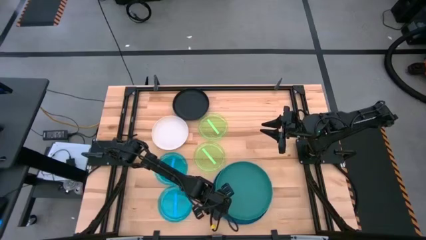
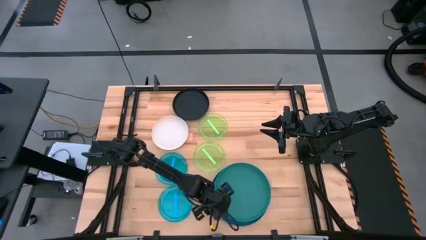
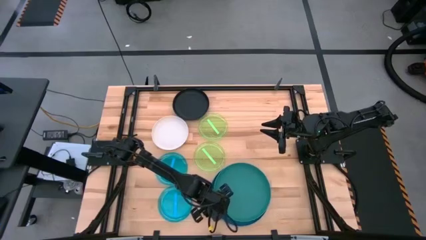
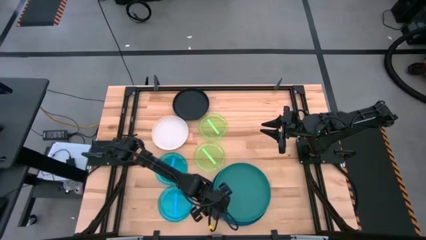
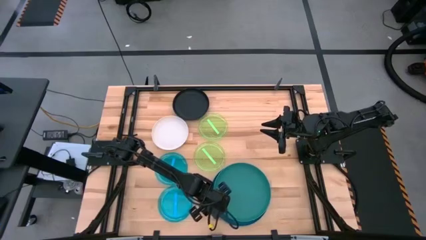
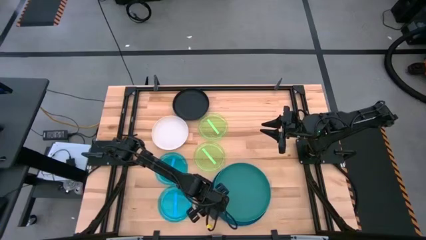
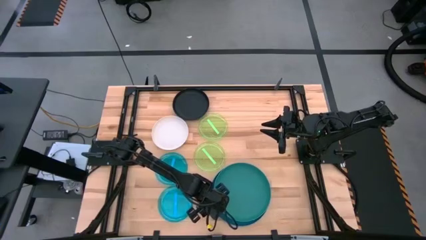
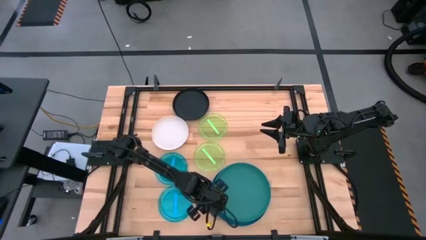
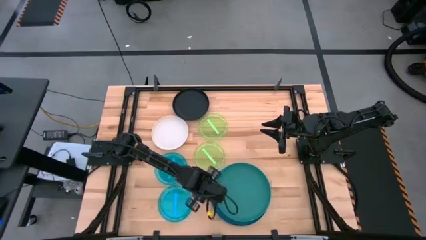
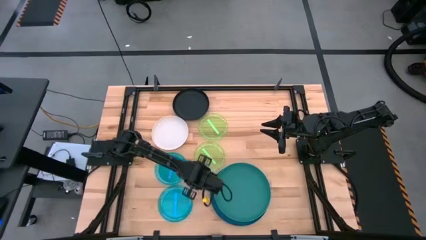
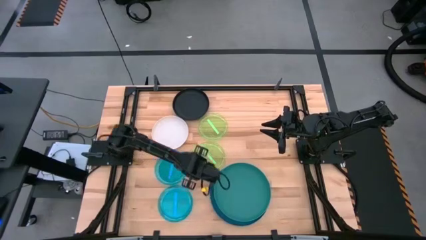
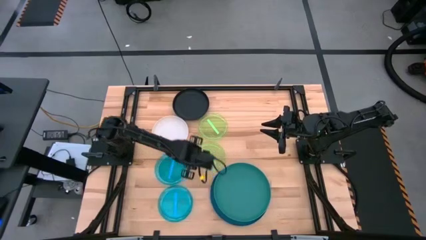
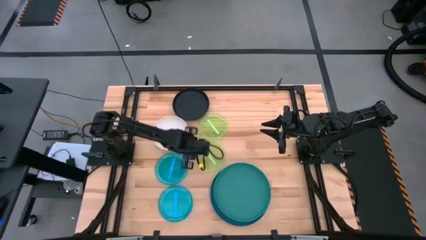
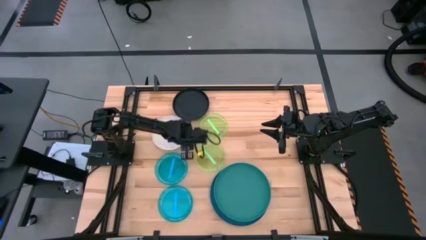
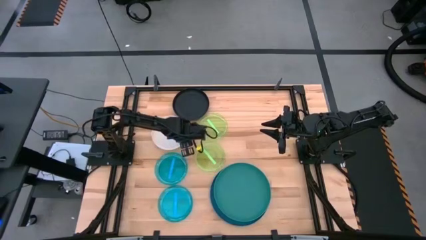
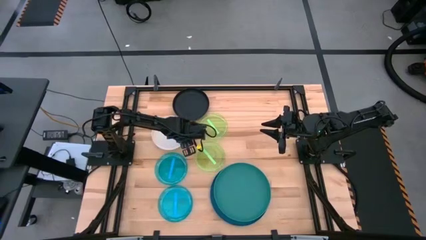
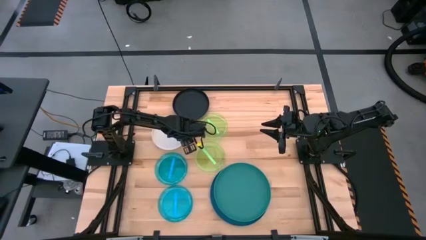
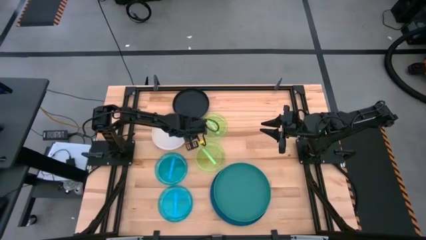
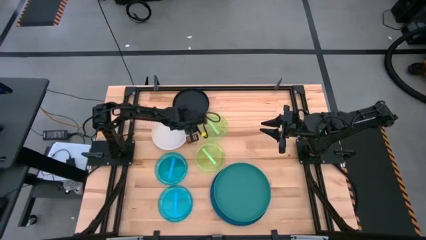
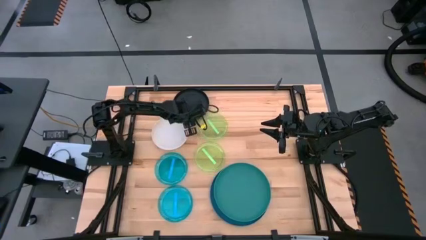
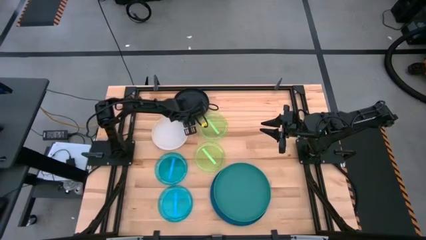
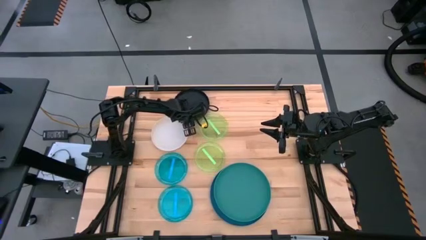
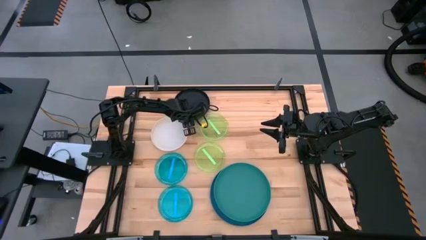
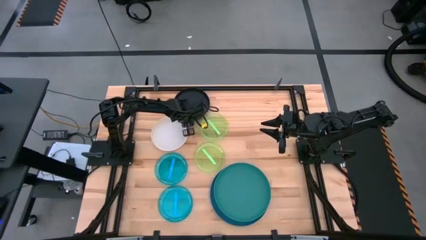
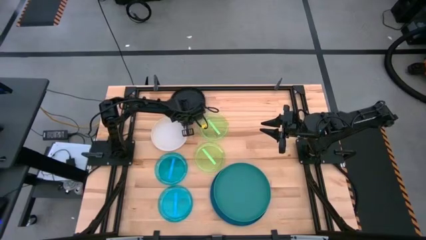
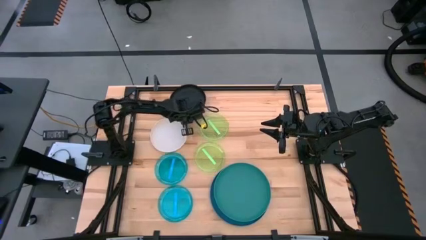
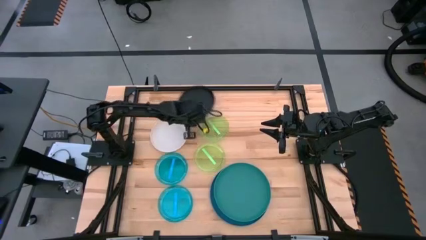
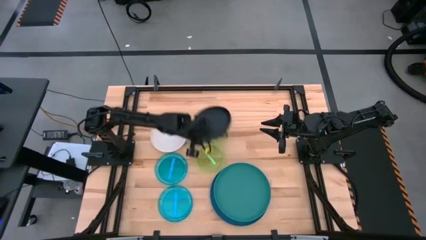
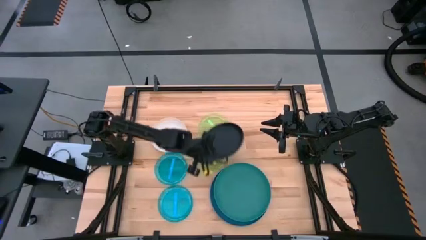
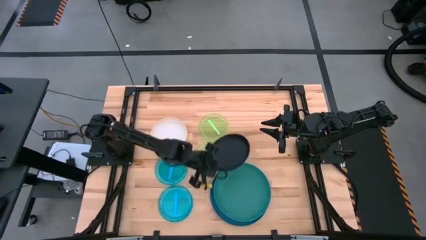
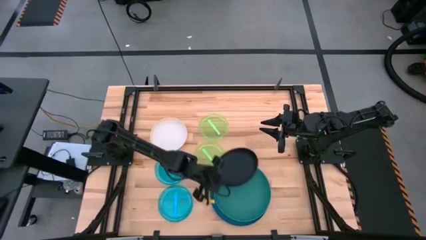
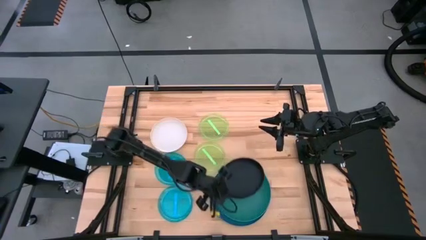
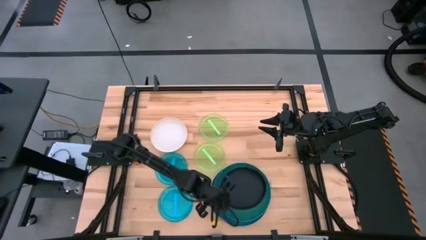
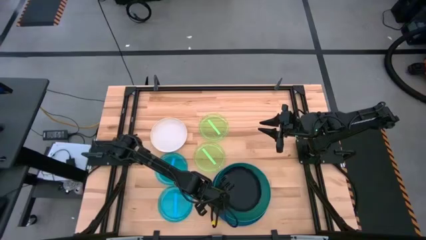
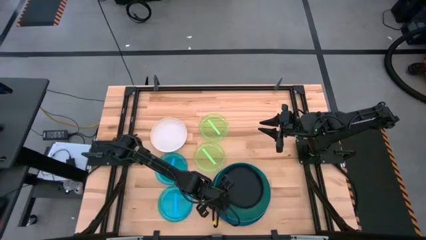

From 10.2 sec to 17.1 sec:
Task: Stack plastic plates
Stack the black plate on top of the green plate

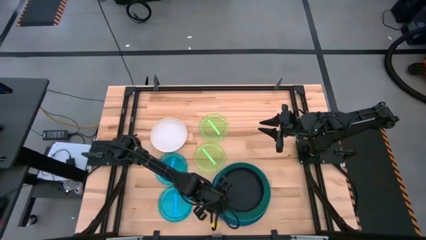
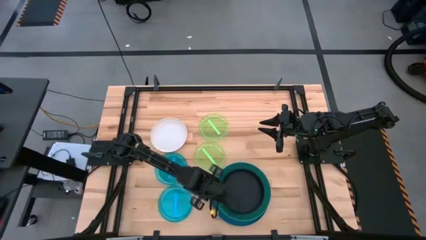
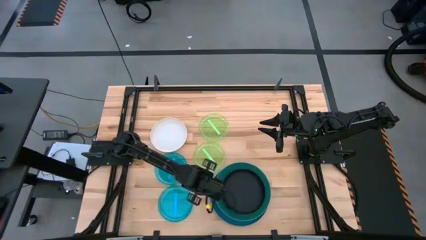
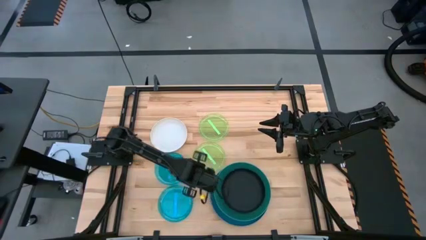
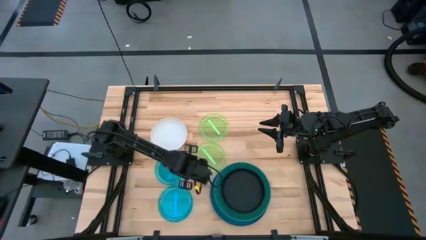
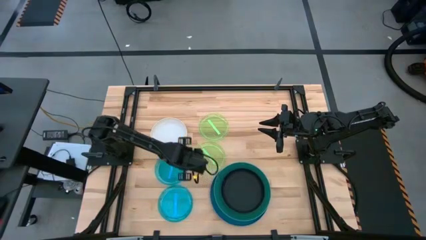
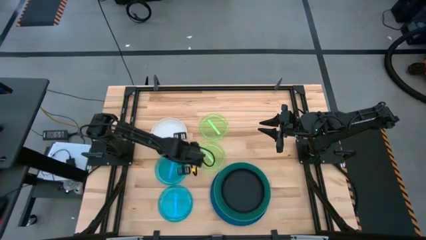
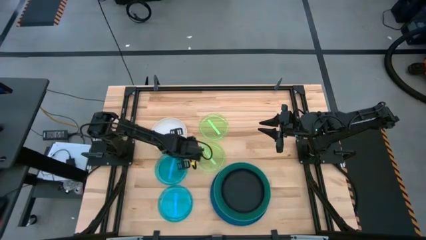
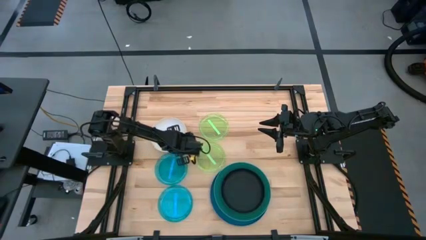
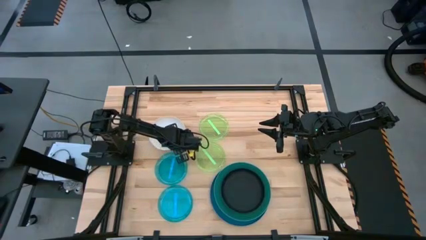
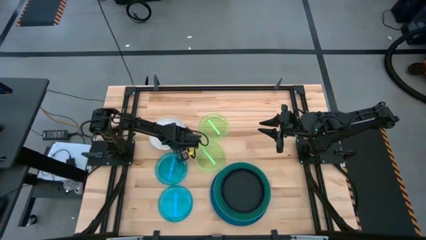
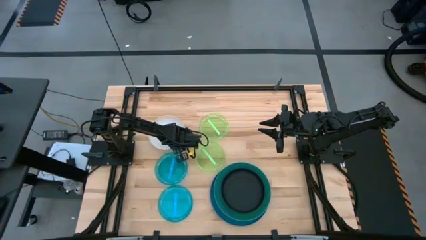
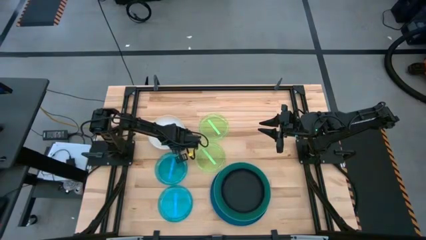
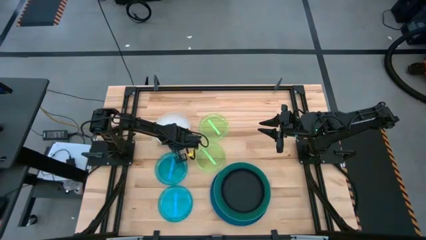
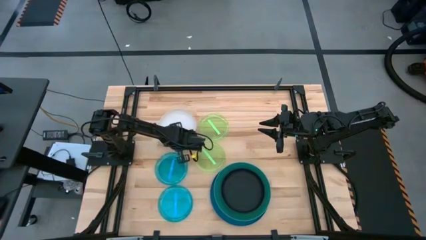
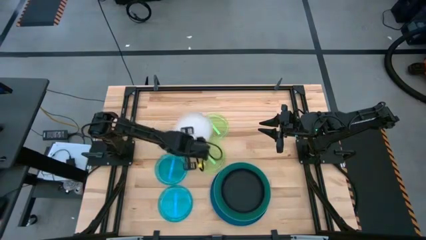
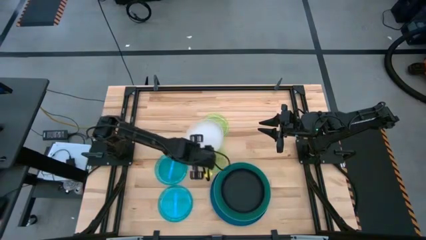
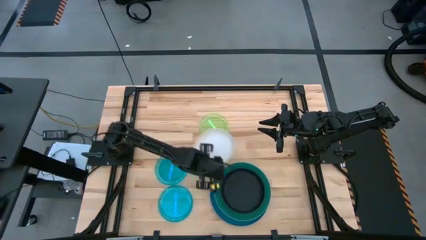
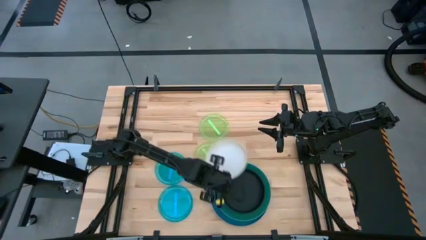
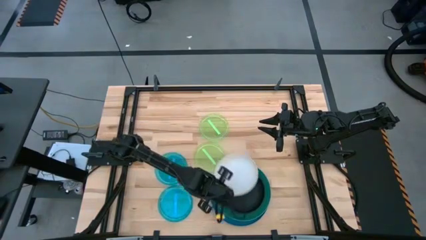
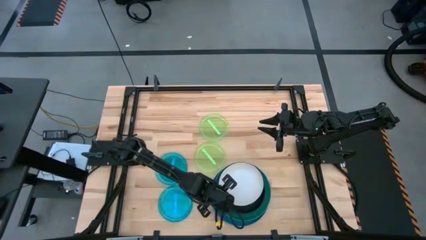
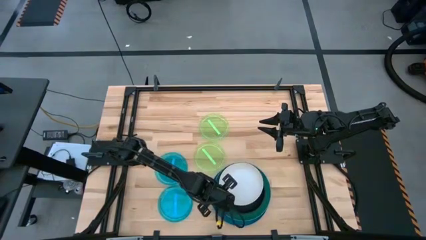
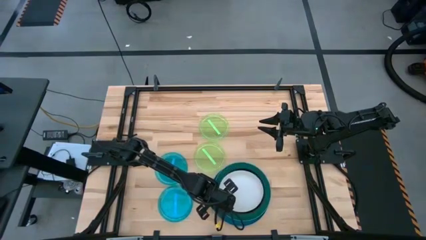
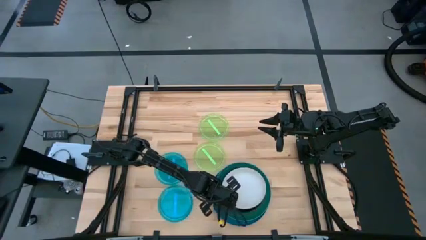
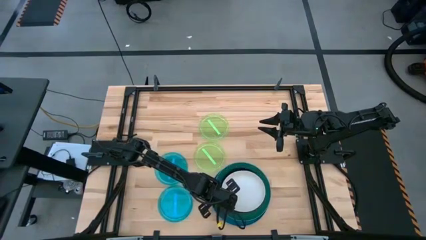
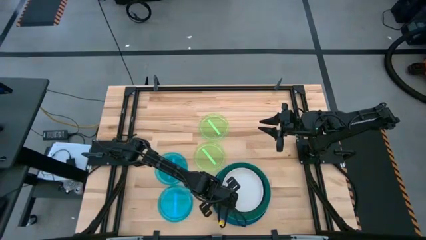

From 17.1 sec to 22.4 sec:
Stack the white plate on top of the black plate

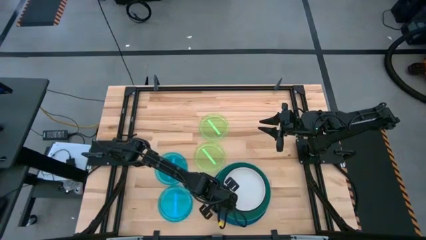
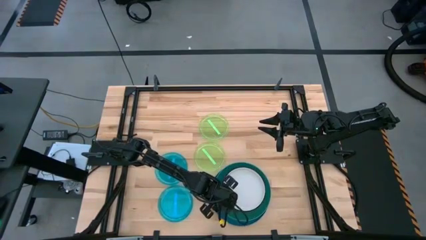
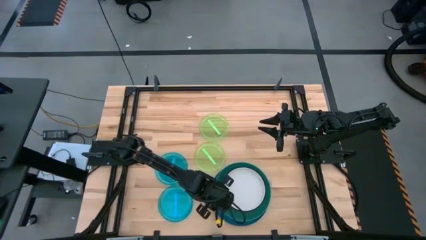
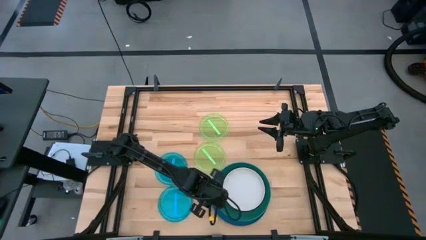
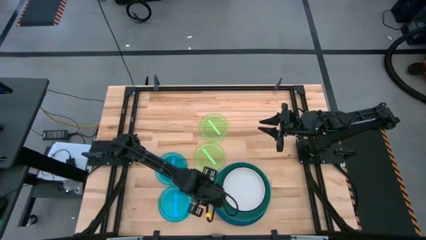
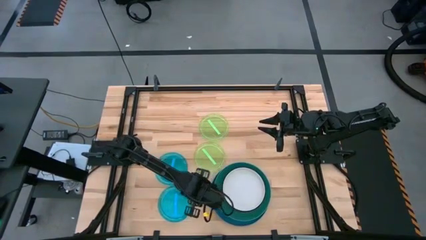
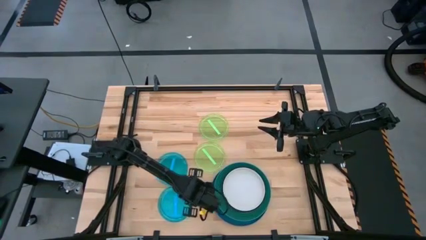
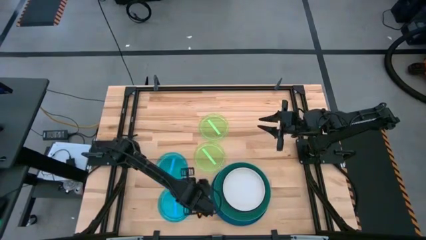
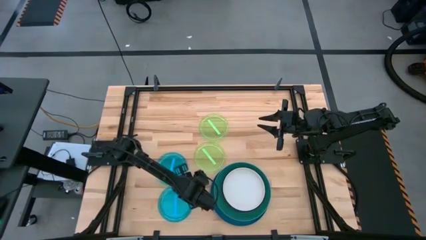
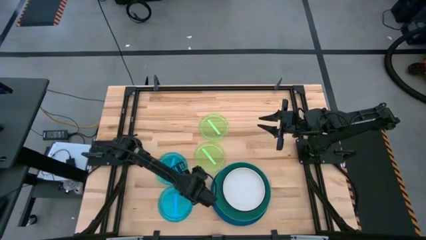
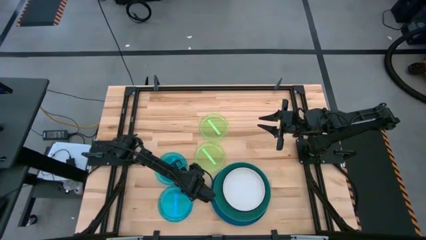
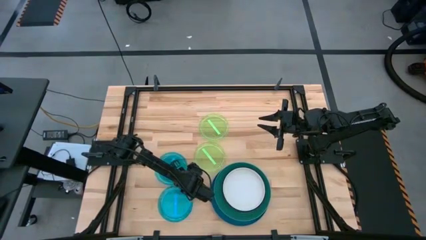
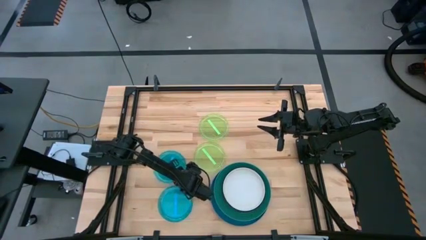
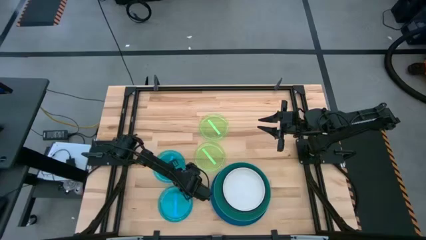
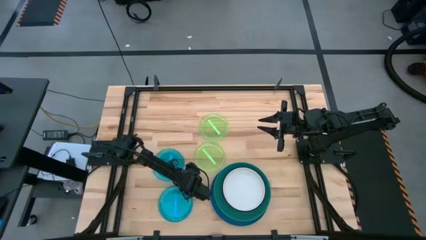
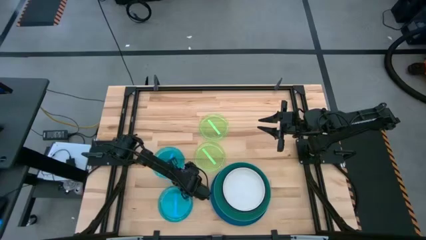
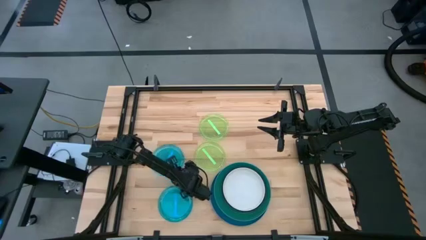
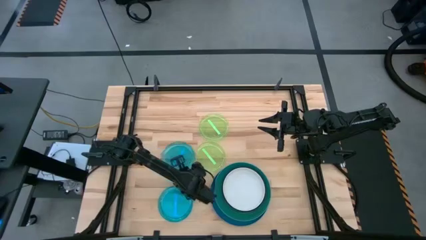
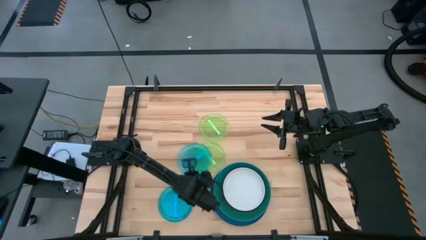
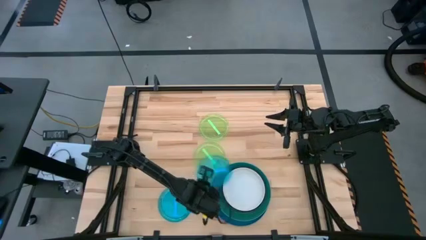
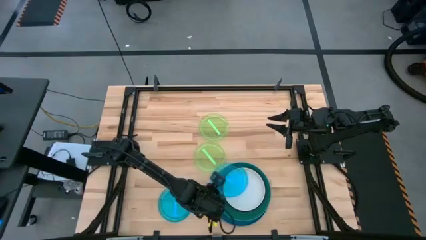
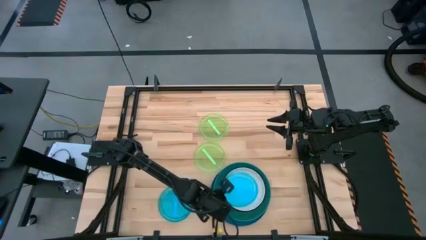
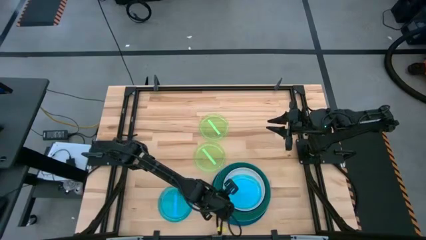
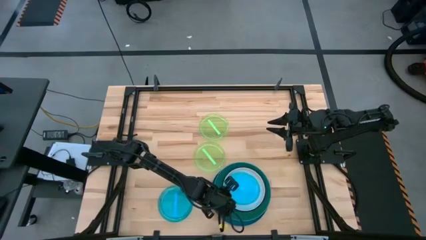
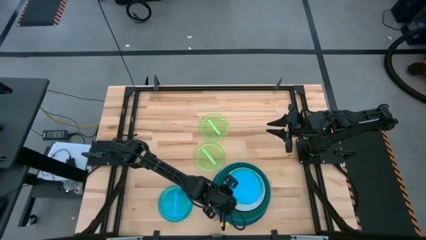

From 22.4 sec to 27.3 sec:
Stack the top light blue plate on top of the white plate
